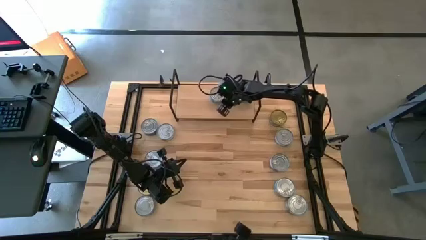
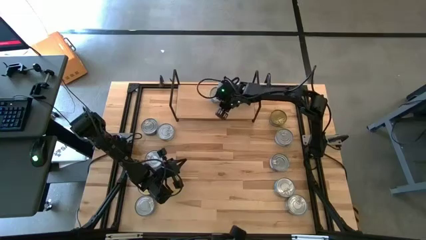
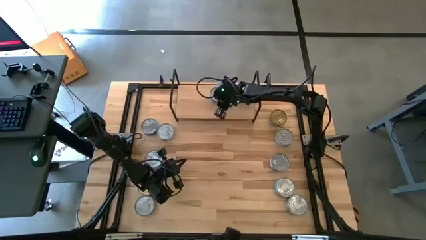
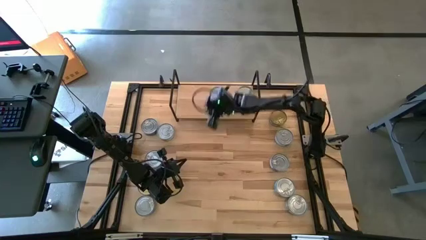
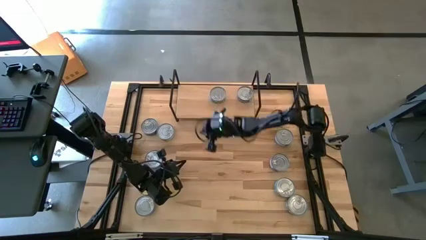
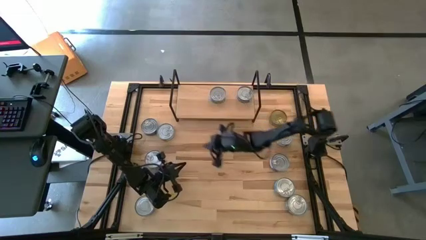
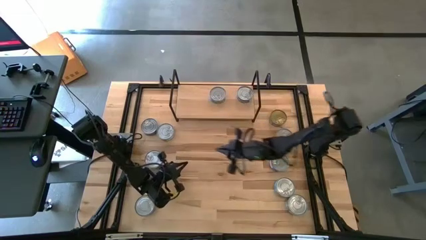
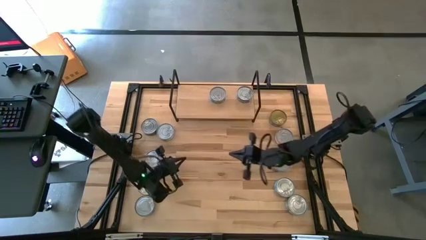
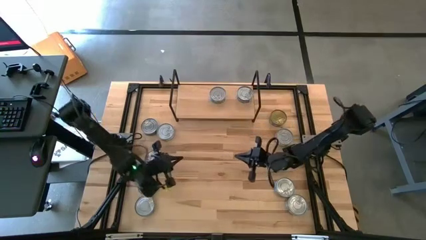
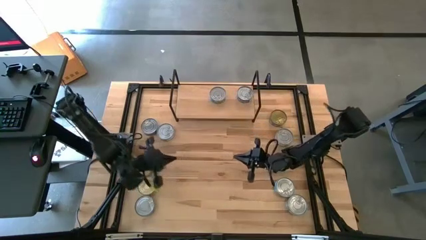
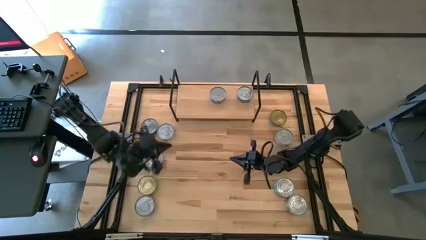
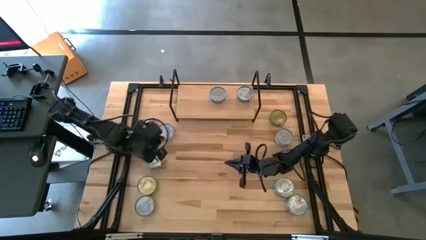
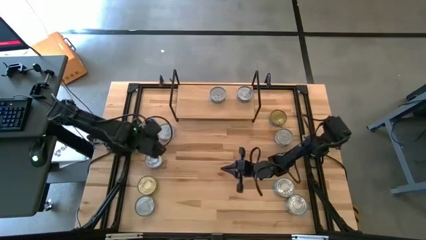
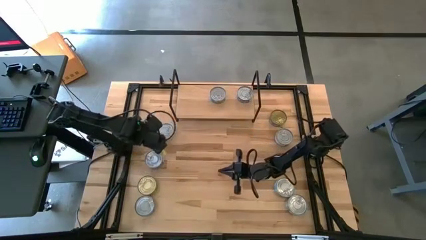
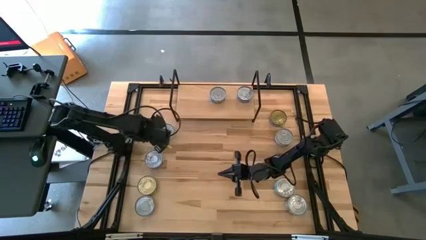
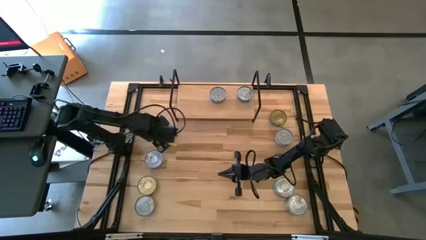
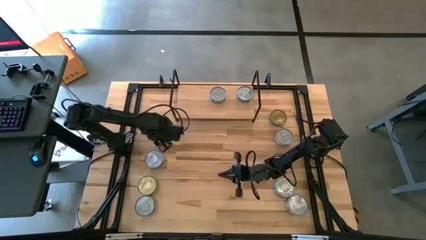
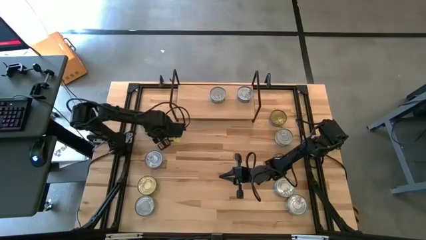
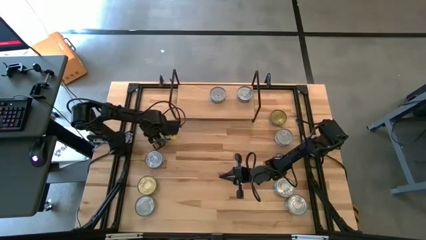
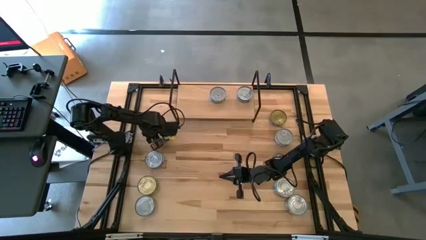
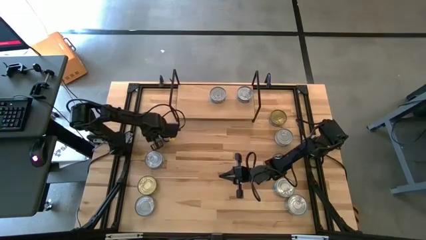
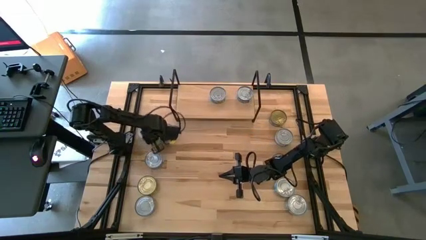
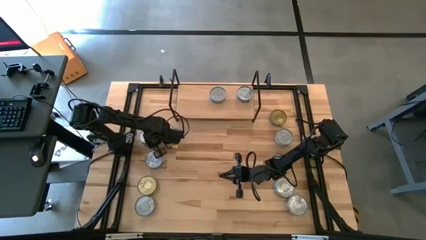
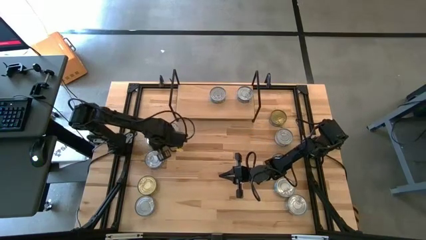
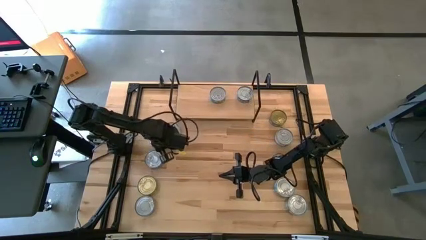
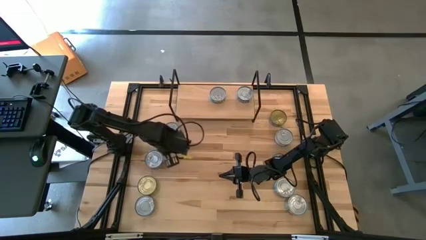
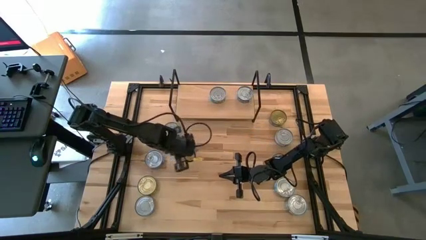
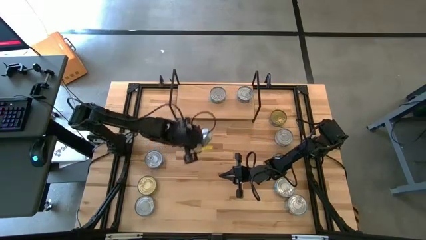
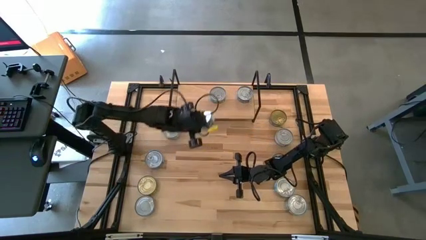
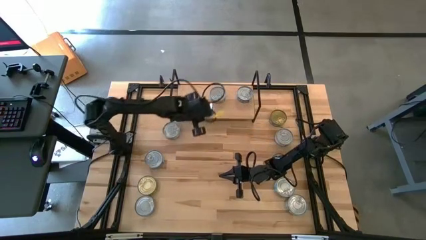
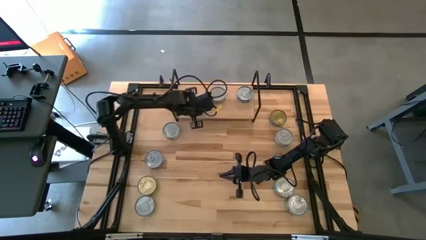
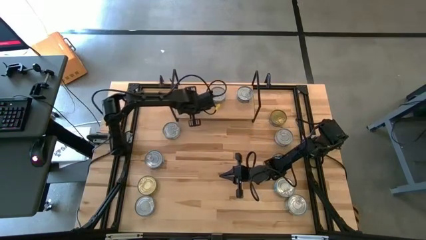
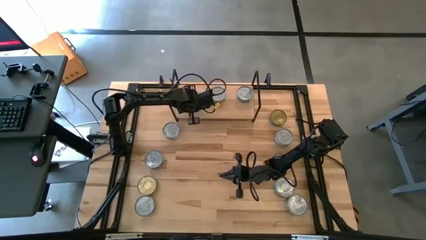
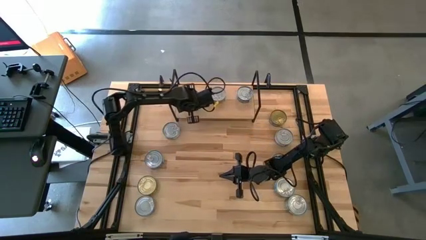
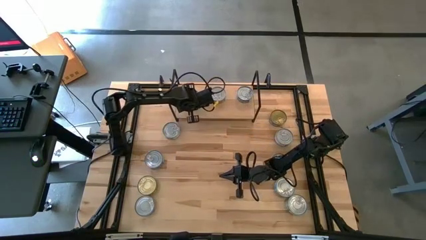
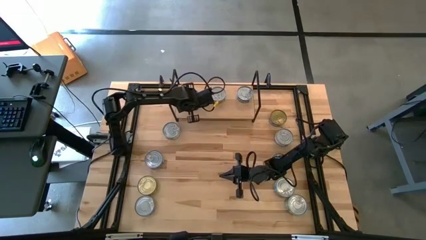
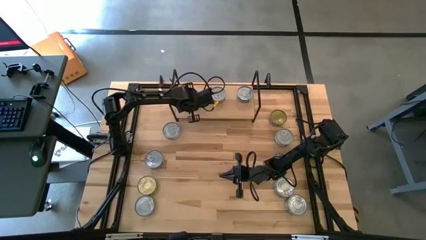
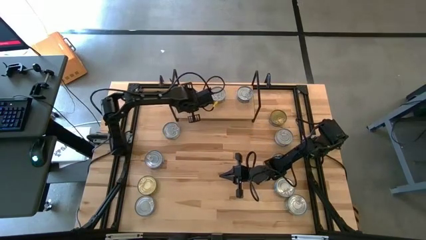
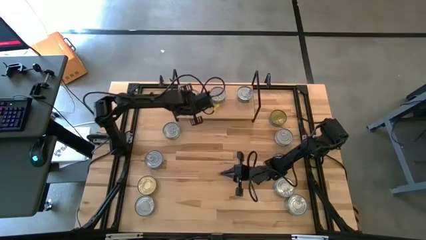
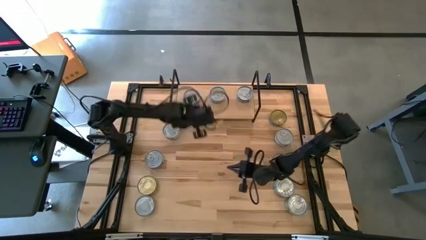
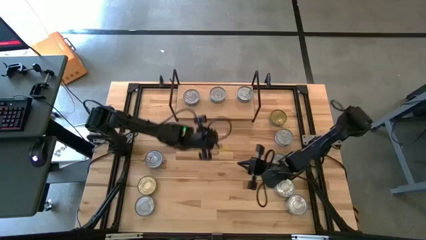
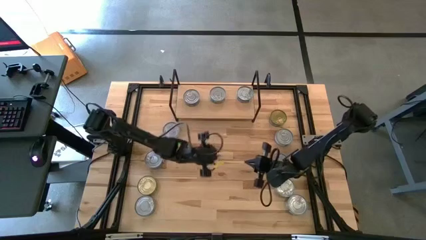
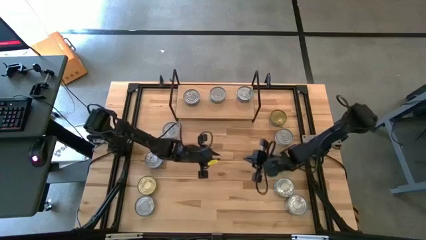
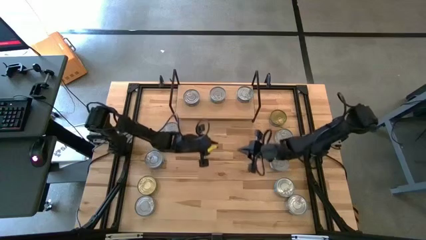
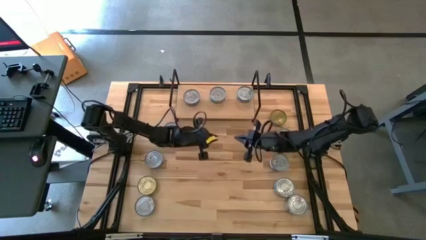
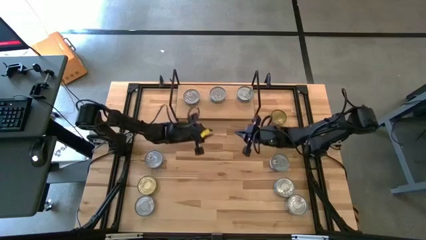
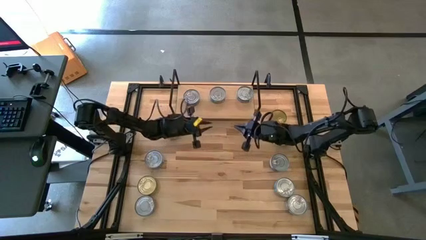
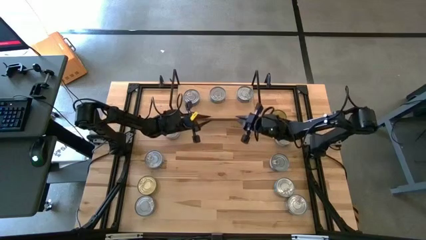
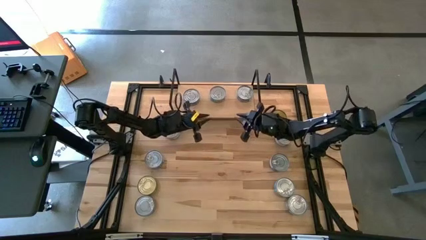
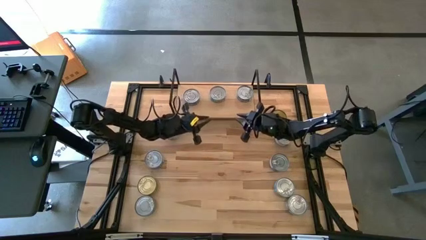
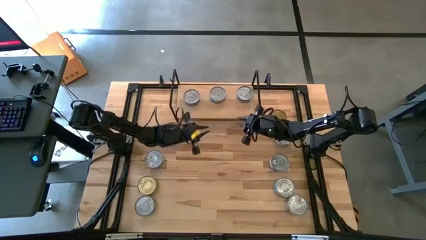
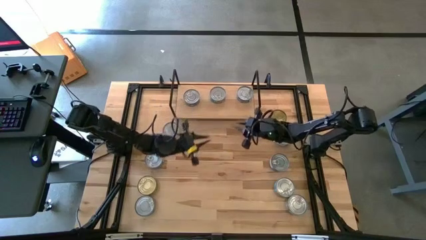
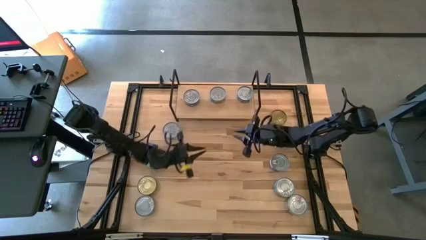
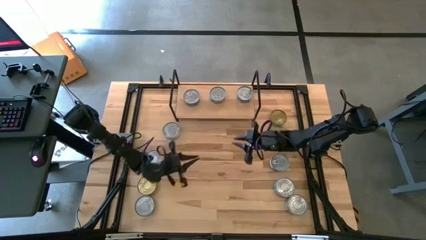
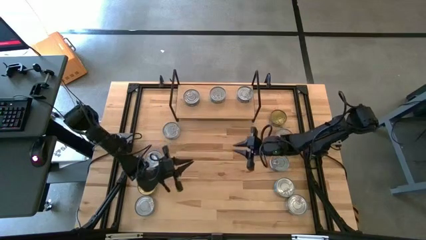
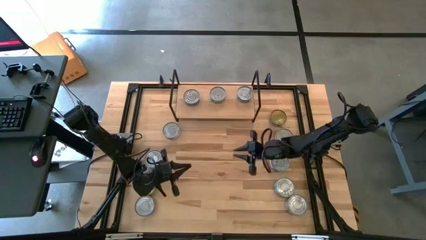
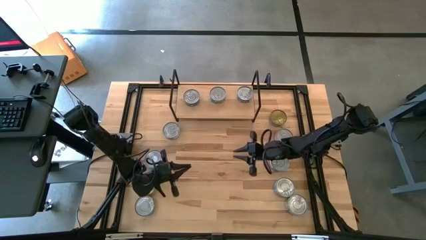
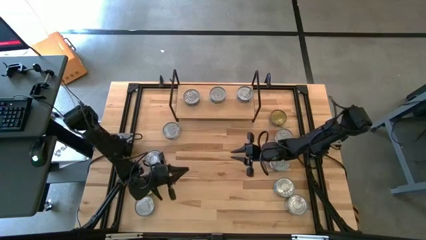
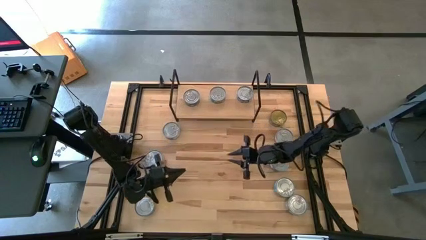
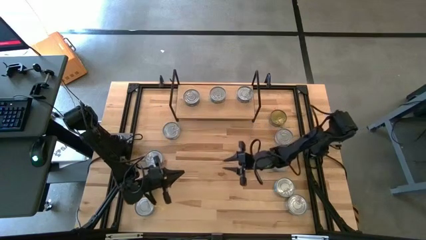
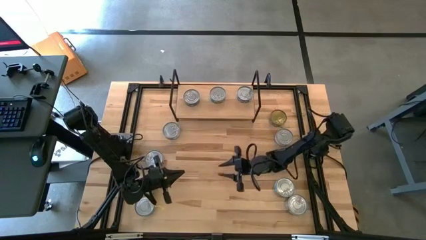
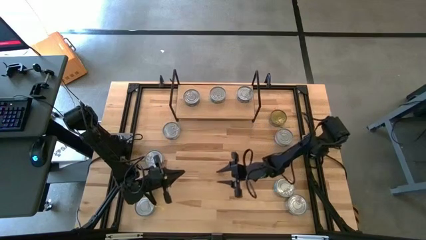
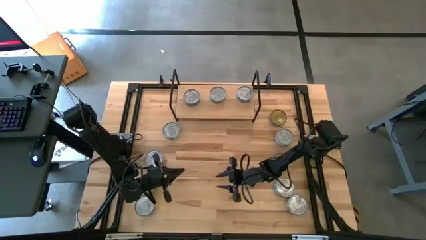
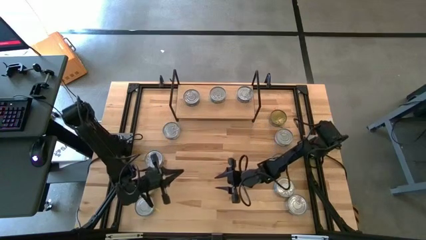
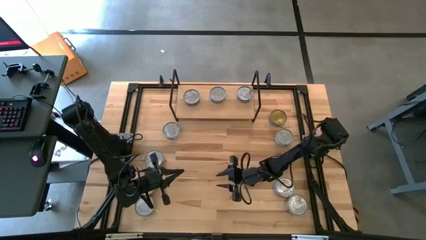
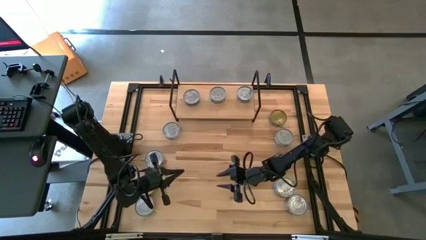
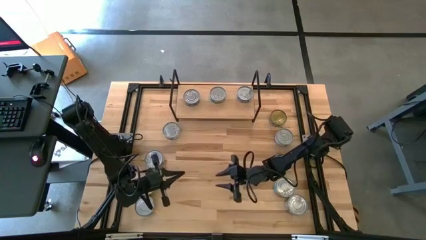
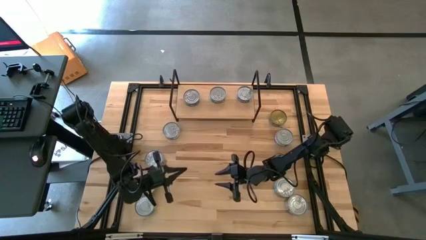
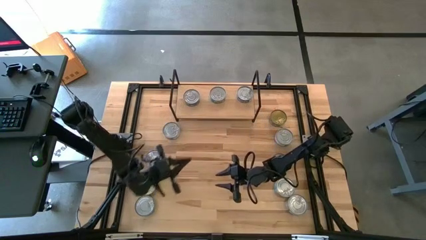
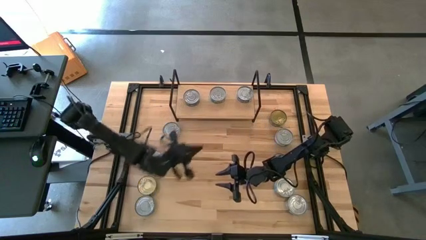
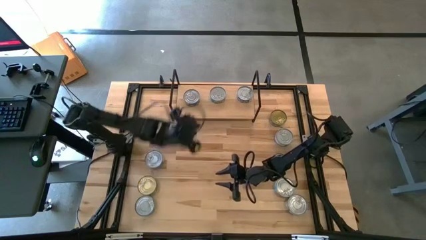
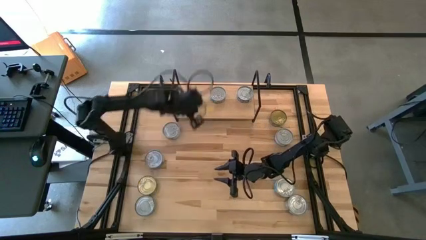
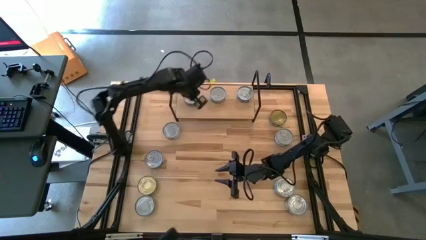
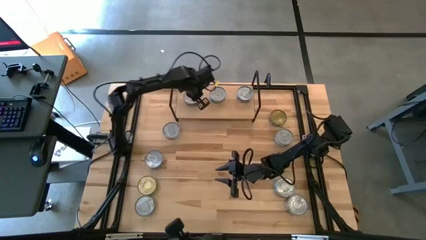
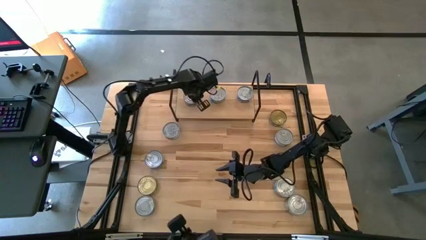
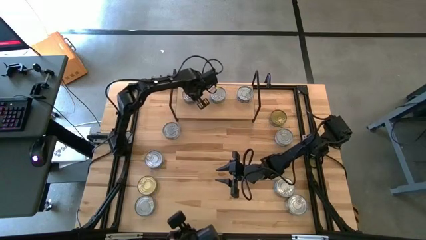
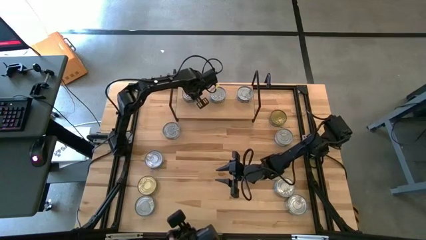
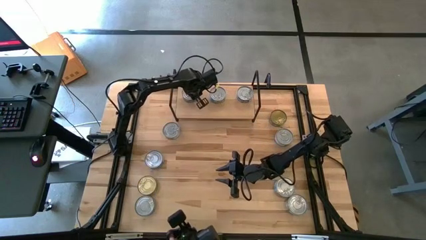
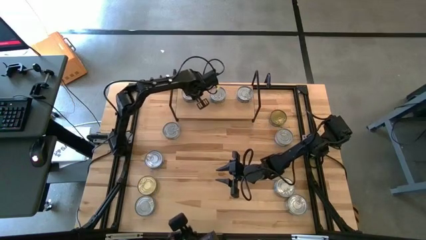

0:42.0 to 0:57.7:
Task: Stack canned seafood by type on shelf
Put the green tuna can on the shelf
